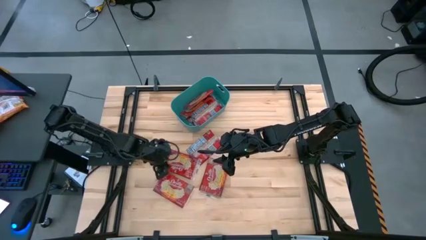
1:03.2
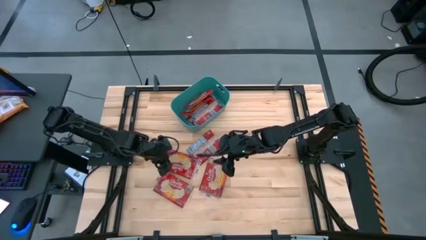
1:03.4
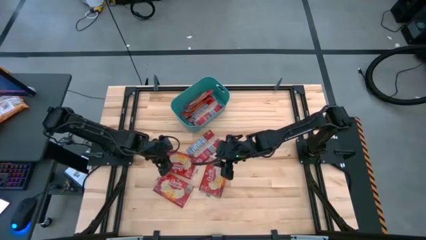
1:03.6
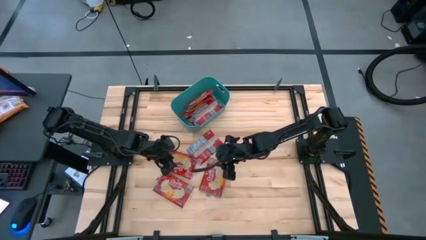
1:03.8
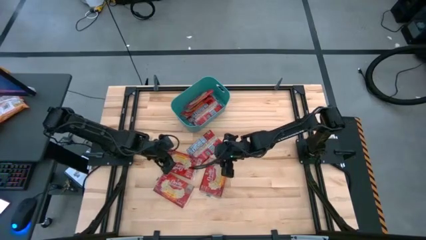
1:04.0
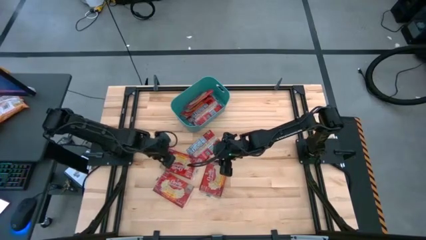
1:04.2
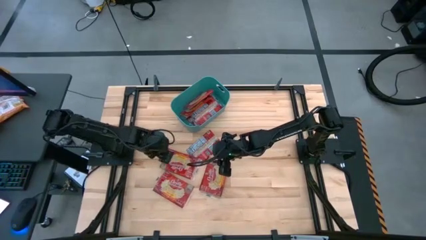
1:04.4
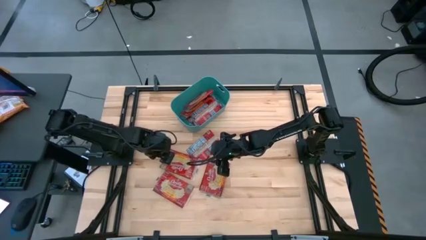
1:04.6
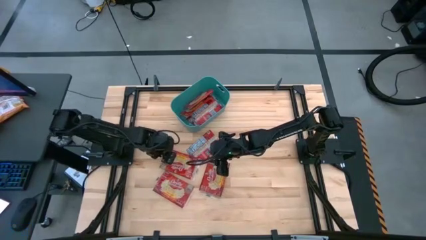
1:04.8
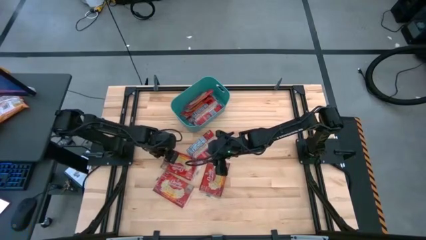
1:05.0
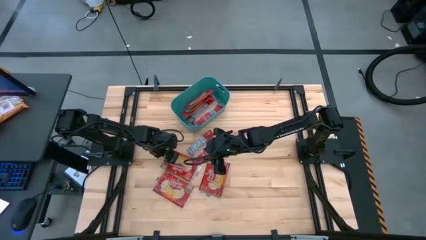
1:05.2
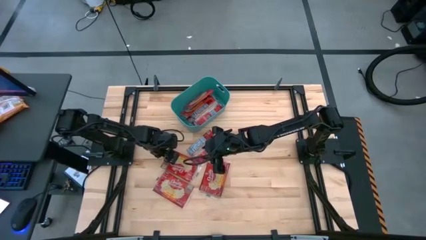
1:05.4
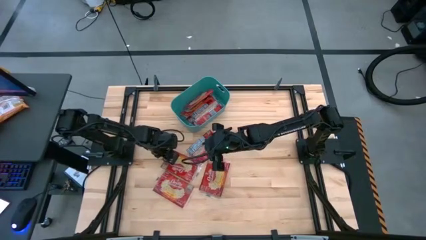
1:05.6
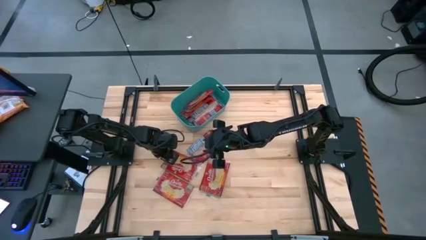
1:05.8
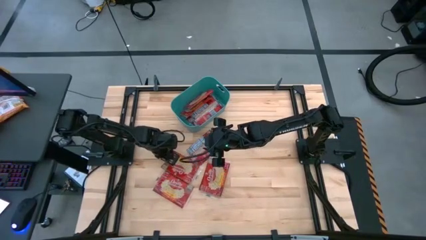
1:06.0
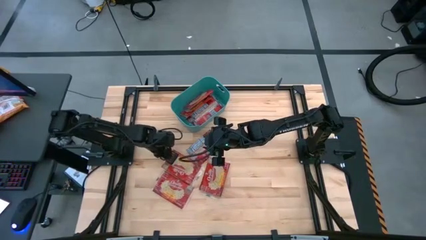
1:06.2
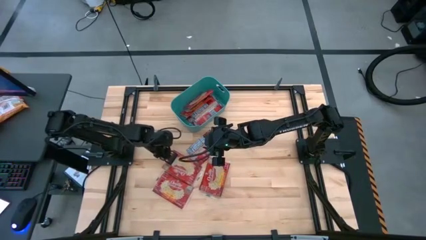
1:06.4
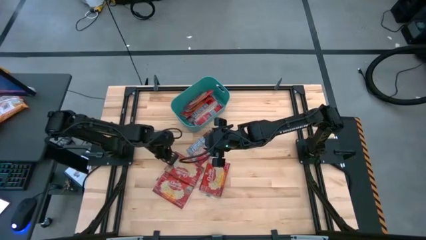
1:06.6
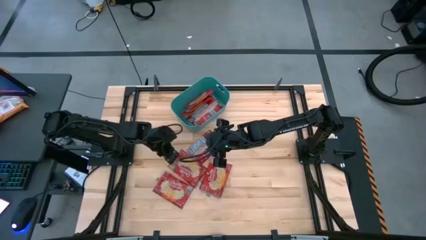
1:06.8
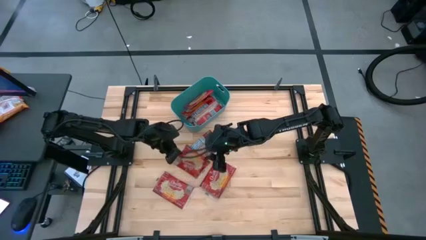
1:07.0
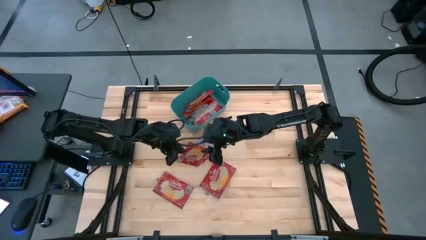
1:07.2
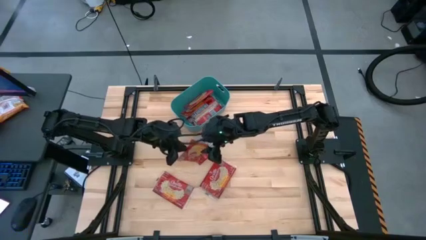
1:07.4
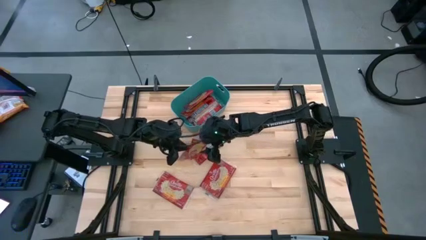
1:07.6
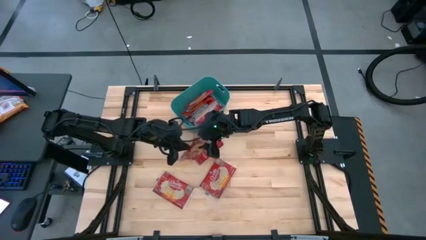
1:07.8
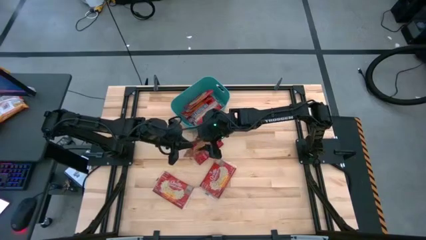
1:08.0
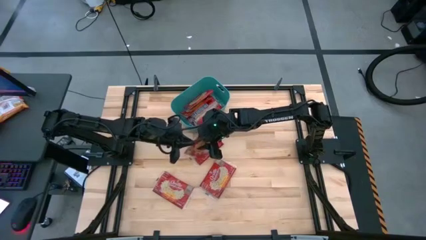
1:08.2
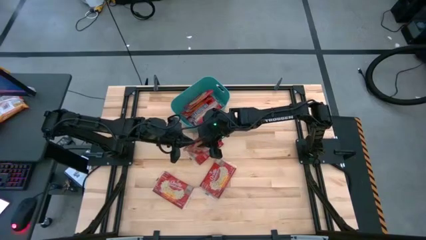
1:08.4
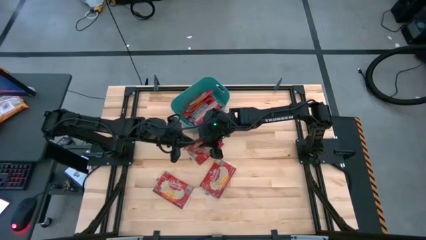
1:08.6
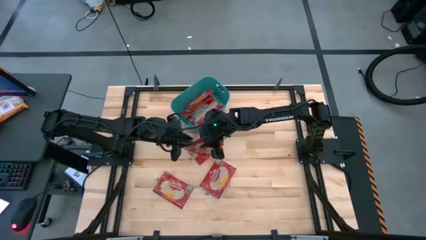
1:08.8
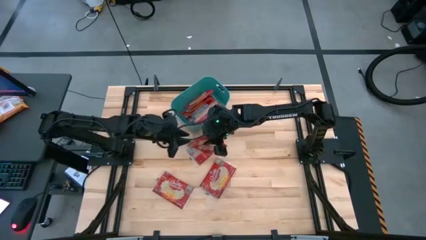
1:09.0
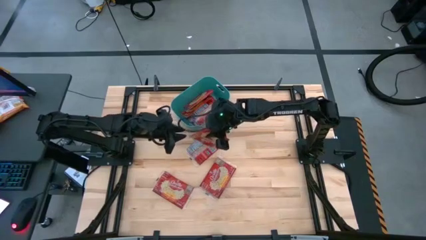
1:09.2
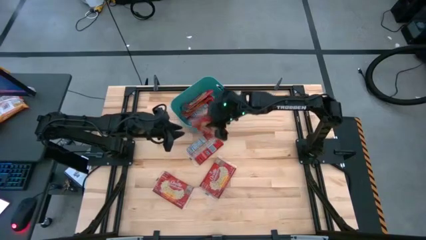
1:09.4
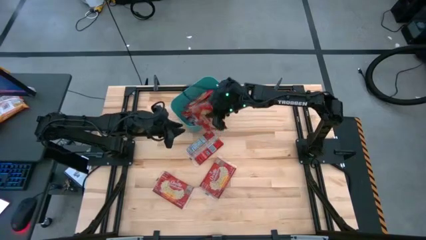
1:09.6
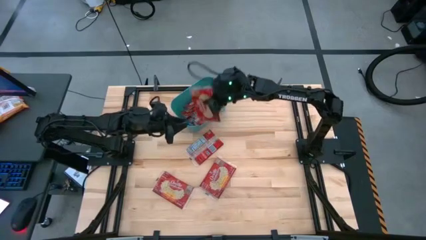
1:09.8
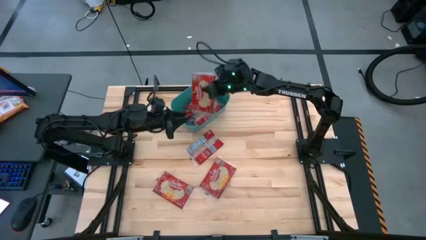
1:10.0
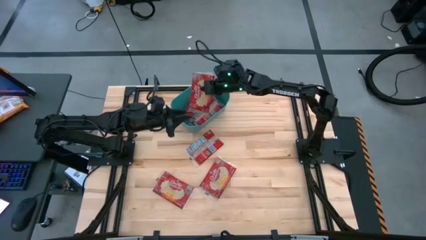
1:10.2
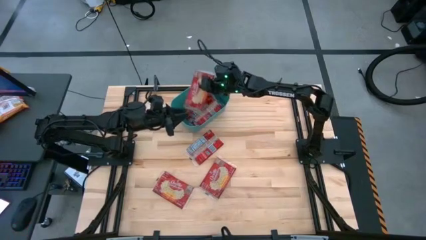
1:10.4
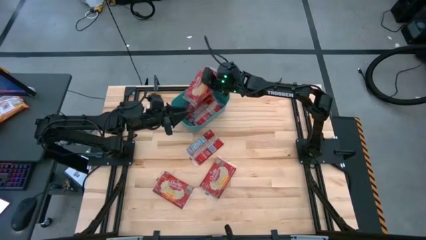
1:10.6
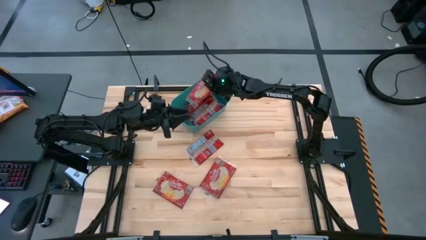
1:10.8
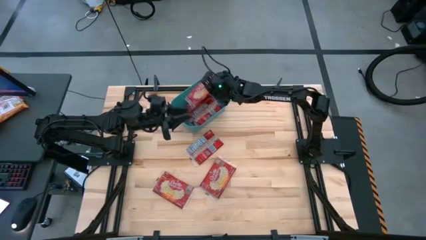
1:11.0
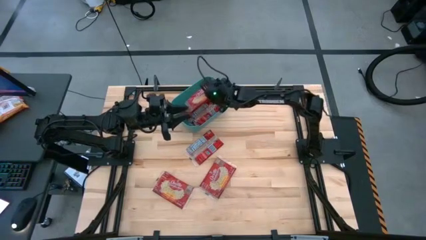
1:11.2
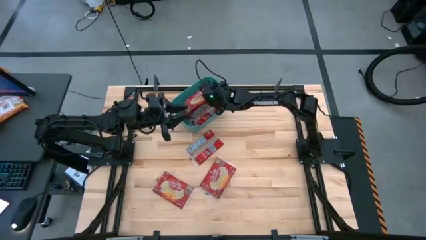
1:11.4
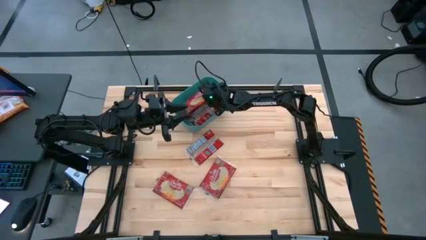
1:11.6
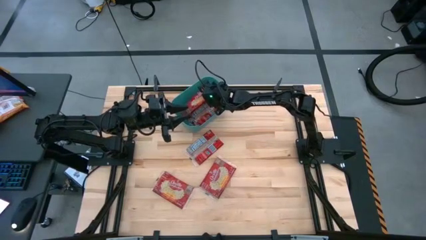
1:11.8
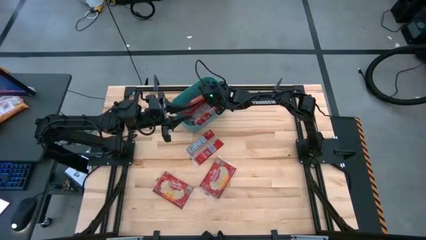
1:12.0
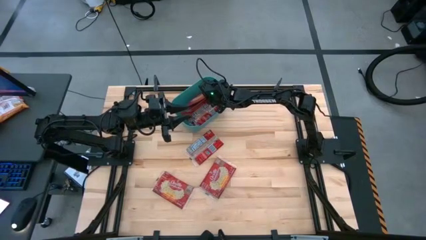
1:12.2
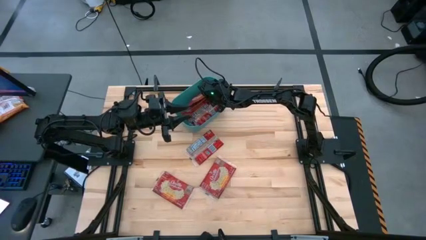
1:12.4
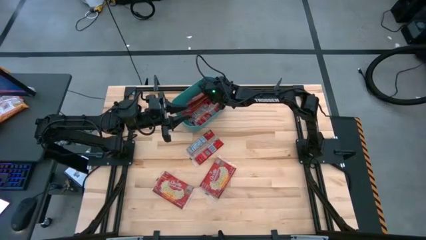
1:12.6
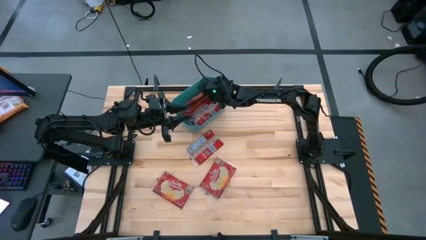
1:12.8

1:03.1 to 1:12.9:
Task: Sort popcorn bags into baskets
Put the red popcorn bag into the blue bin

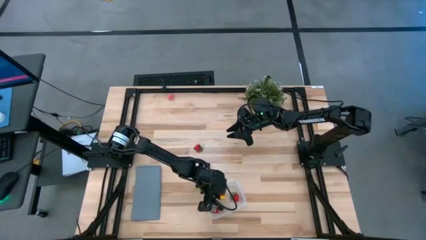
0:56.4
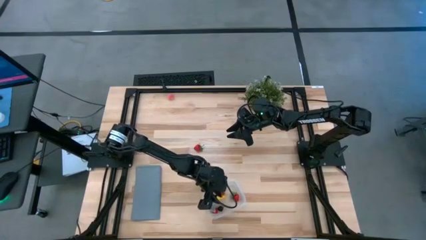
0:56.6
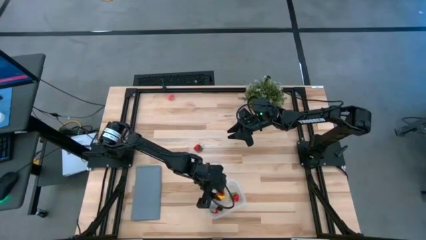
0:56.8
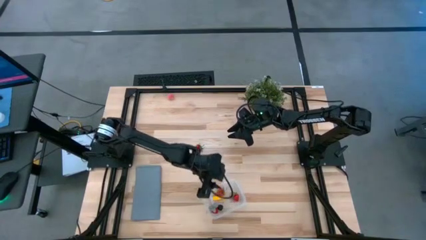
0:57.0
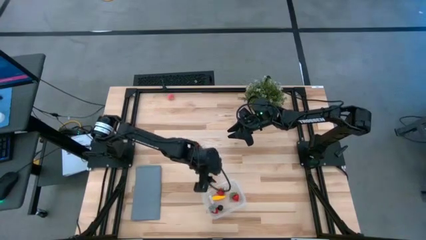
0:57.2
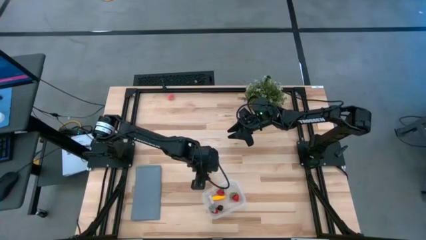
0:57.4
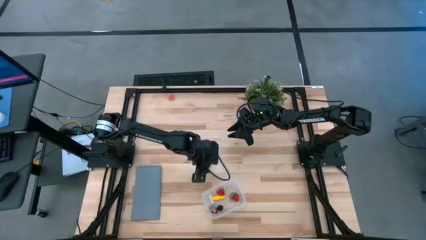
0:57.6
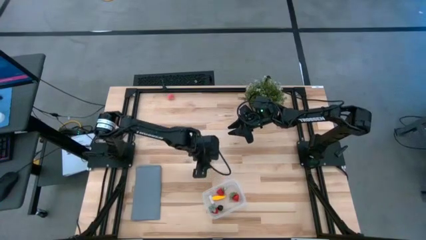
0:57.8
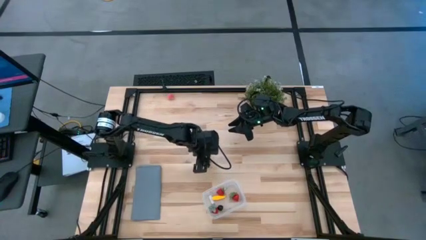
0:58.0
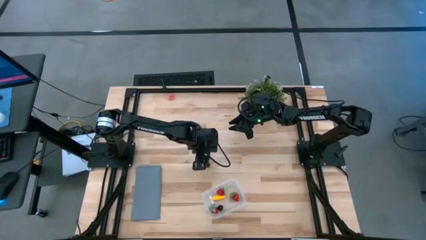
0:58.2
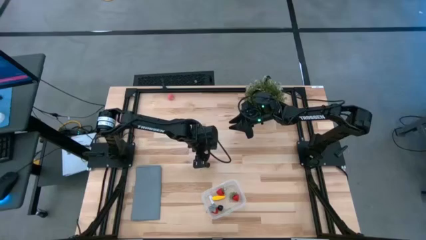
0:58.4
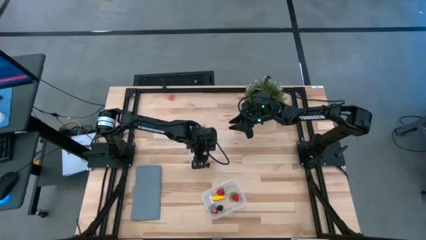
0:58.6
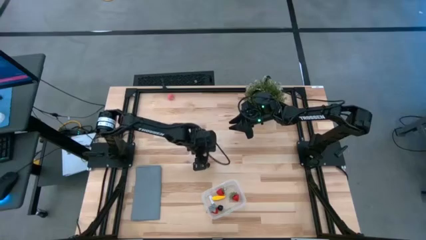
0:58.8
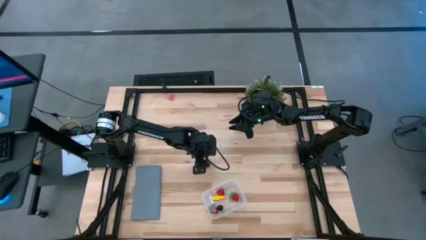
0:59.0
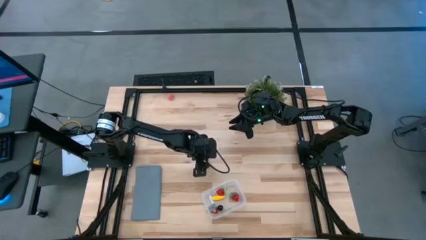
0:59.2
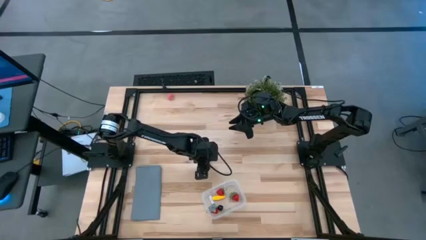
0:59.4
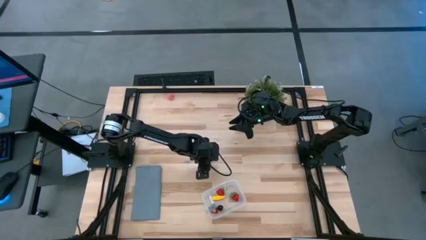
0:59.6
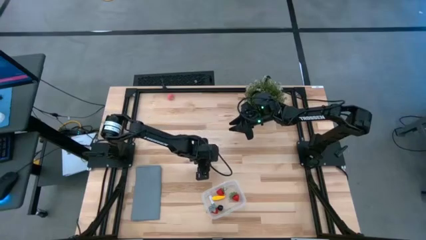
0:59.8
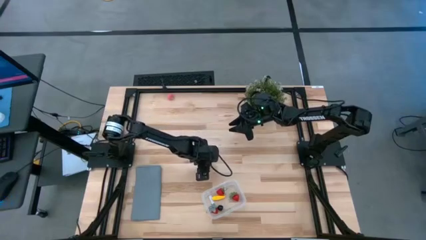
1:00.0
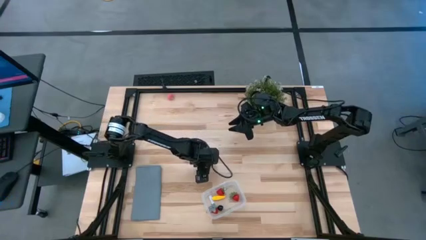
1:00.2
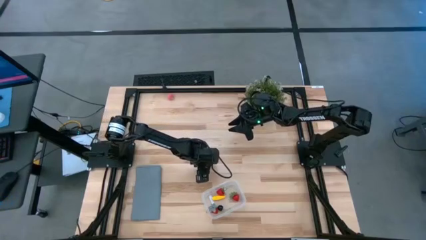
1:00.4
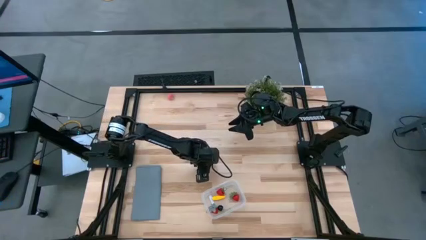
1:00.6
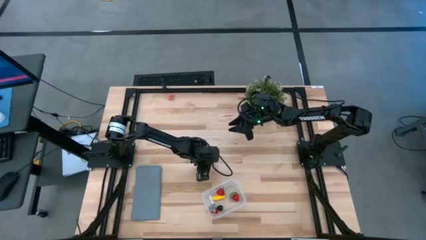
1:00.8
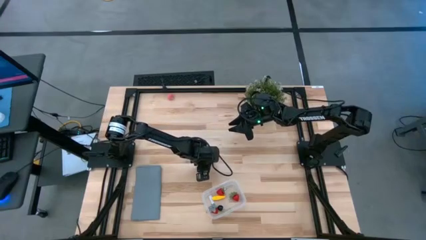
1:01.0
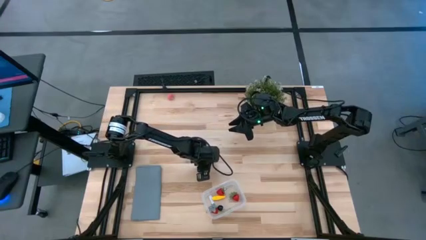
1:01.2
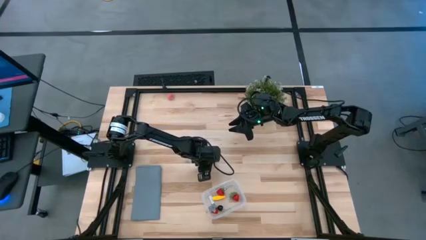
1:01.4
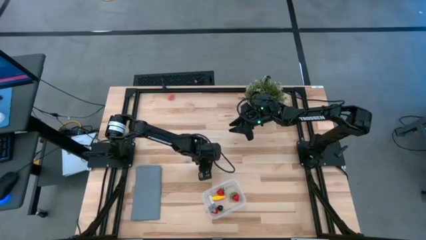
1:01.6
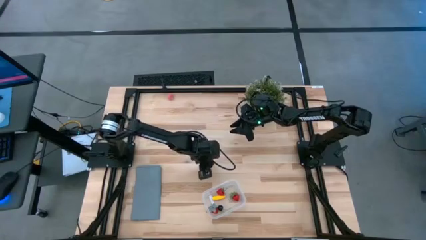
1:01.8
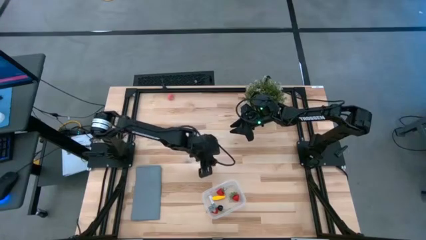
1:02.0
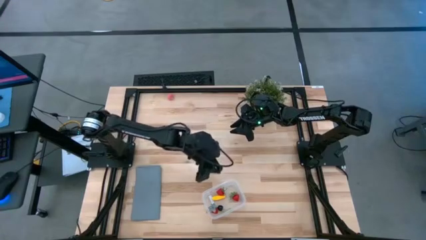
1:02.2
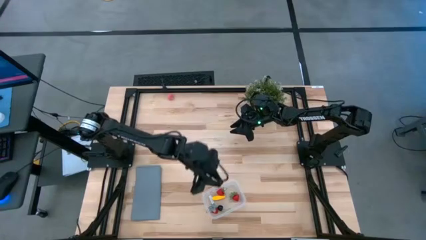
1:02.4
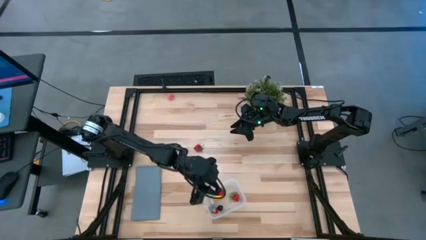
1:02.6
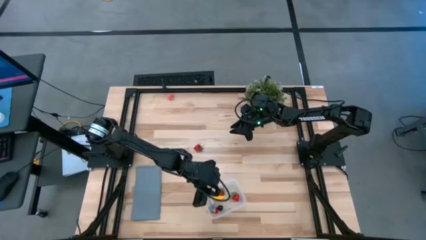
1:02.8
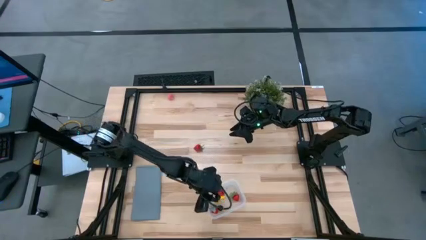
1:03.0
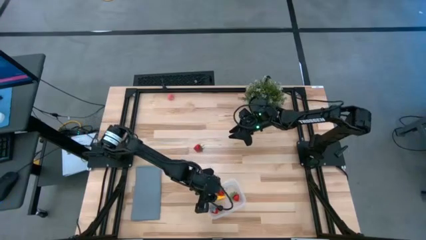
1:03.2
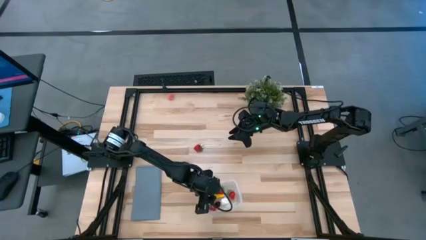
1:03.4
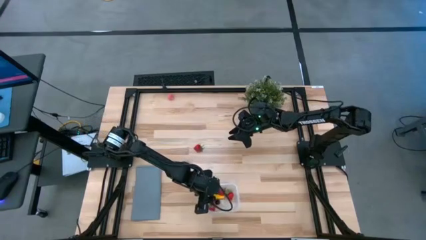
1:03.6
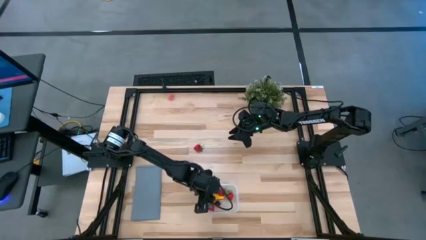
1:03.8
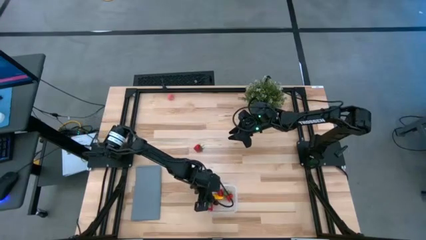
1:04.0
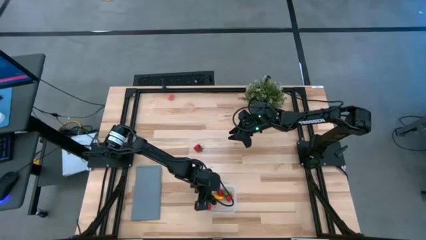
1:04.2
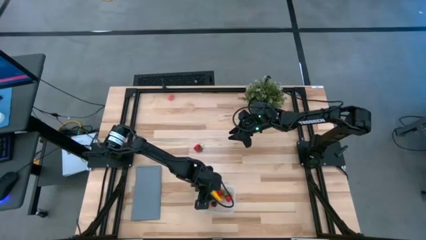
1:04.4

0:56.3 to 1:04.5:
Task: Pick and placing Produce into tupperware
Put the black cherry into the transparent bin
